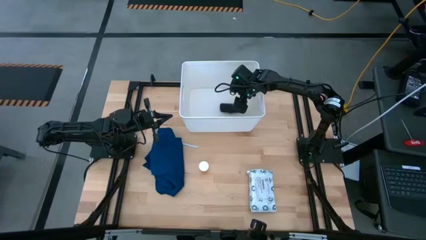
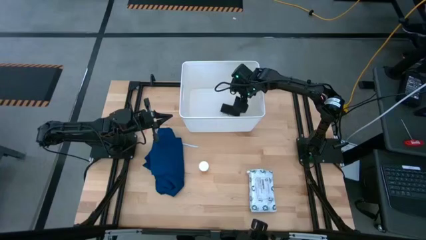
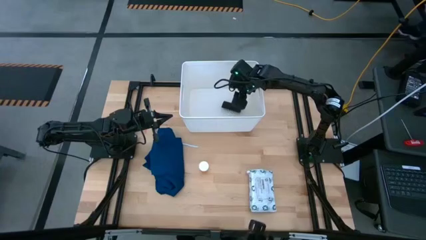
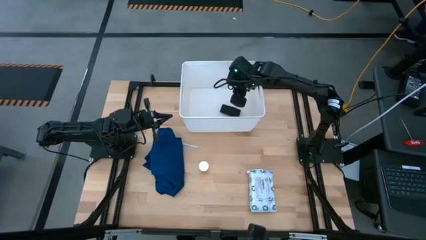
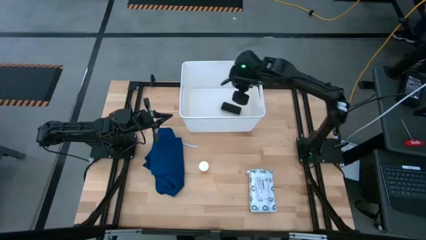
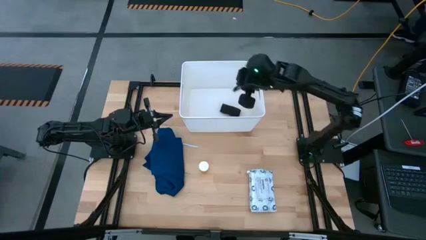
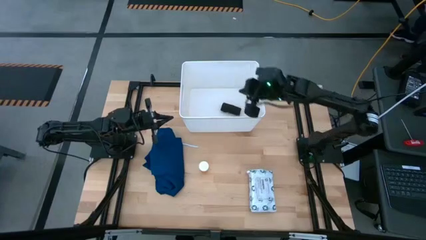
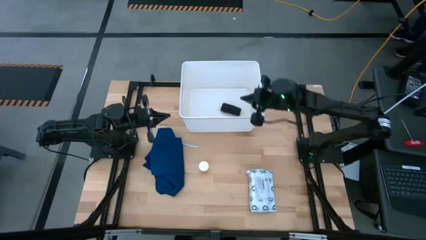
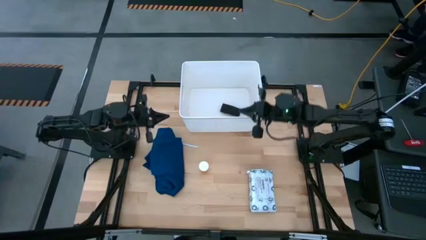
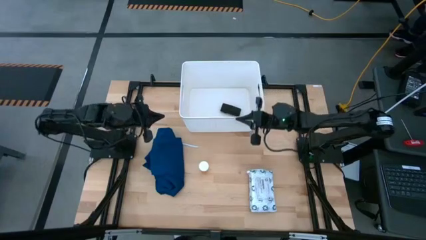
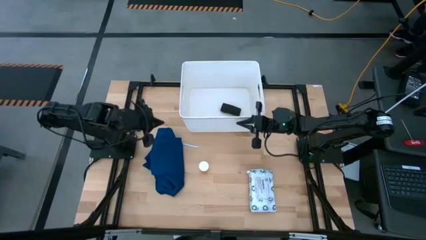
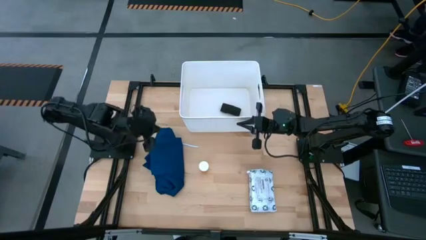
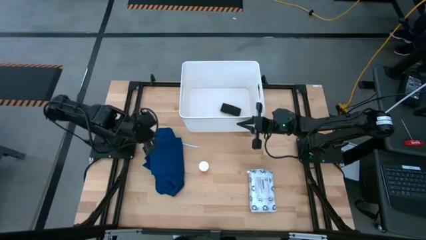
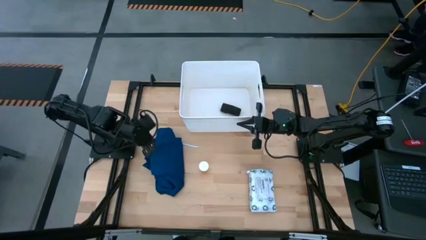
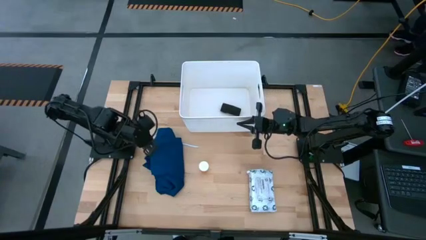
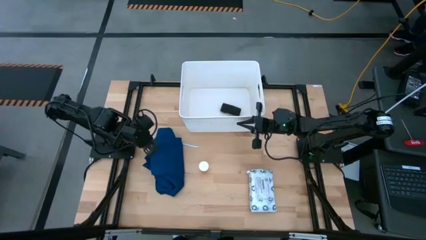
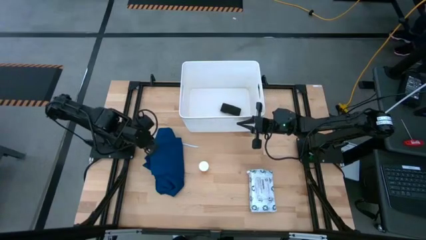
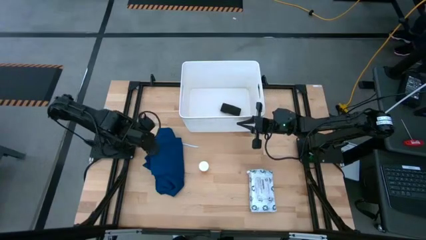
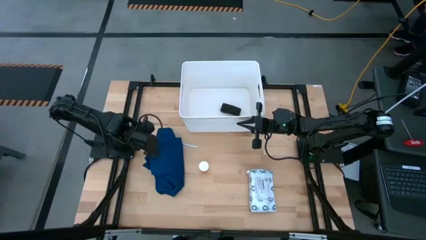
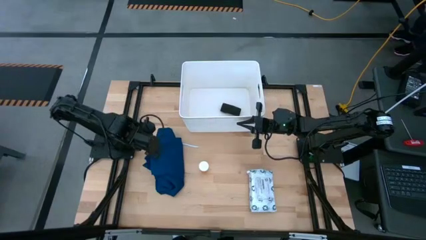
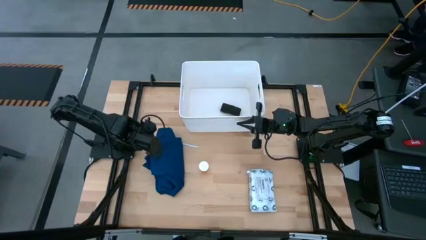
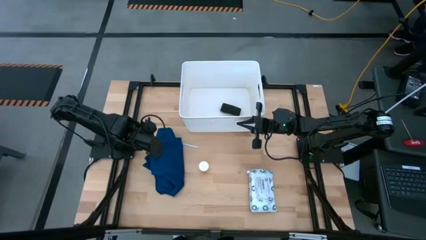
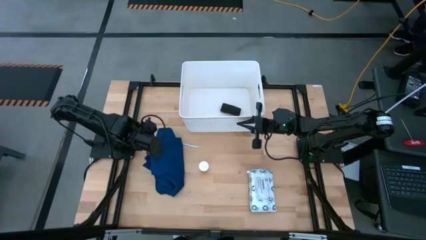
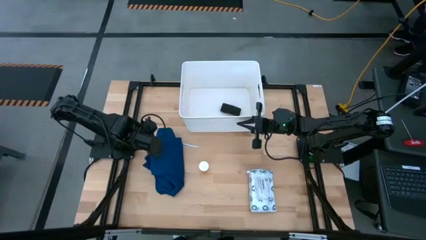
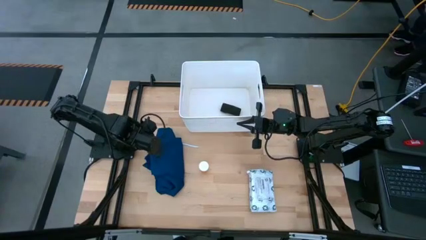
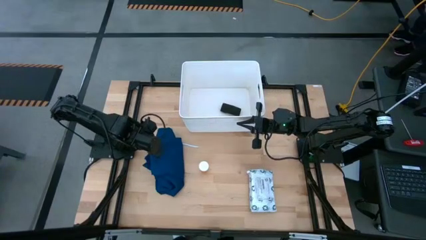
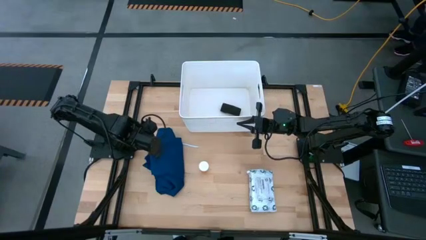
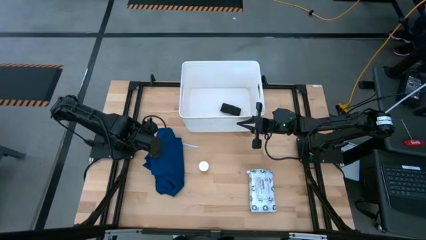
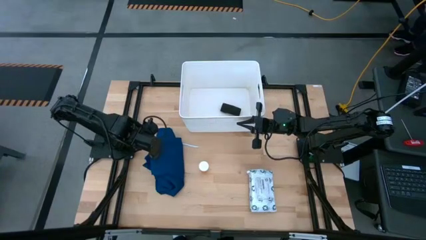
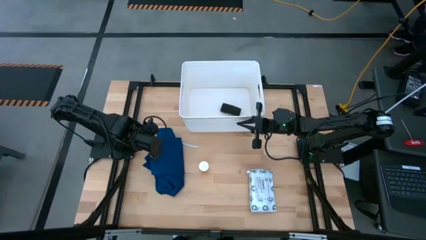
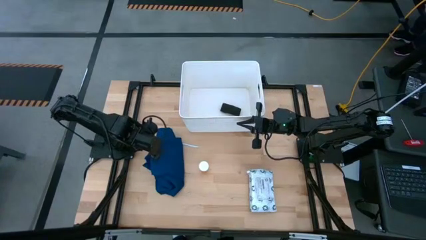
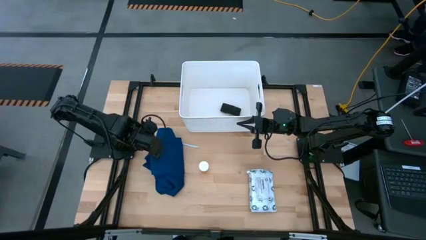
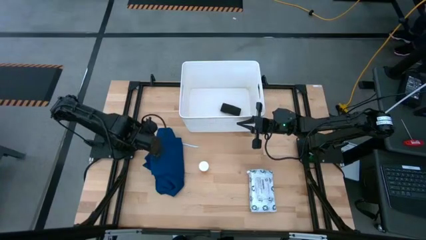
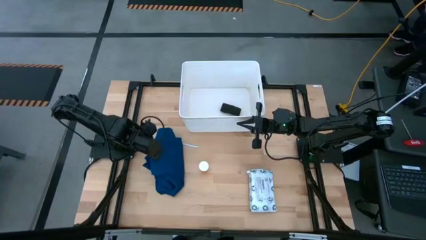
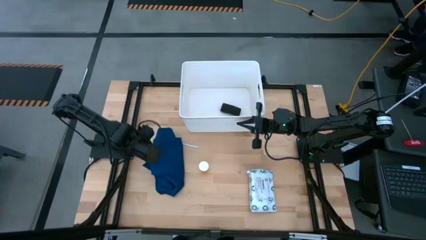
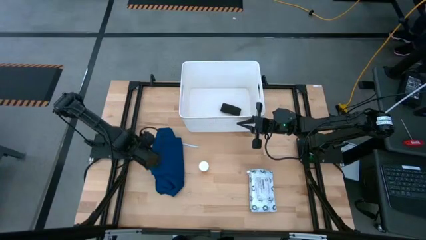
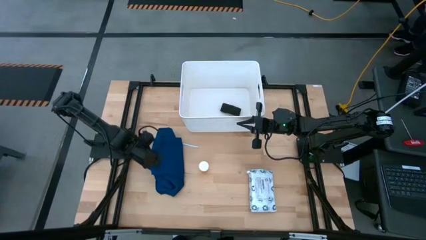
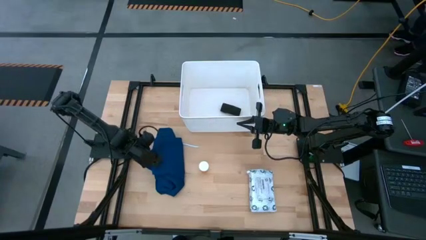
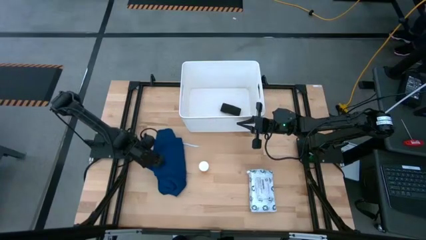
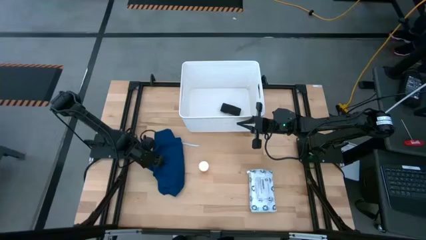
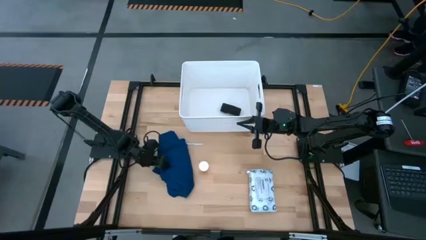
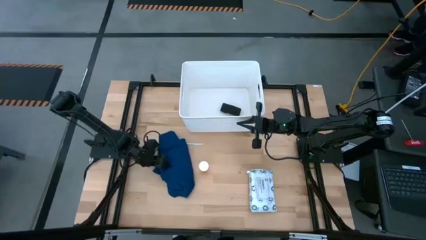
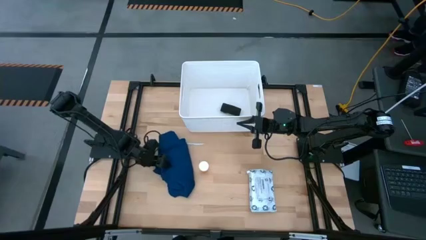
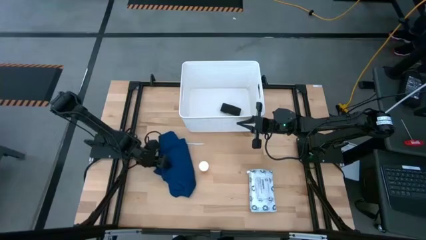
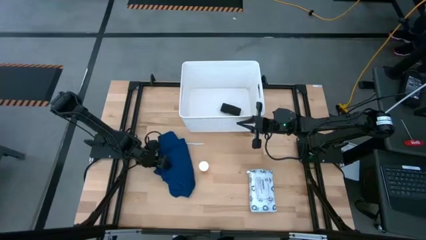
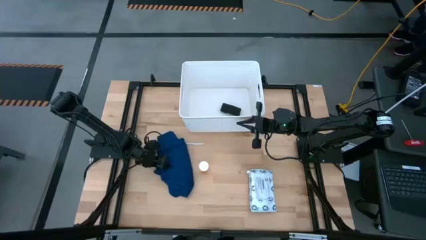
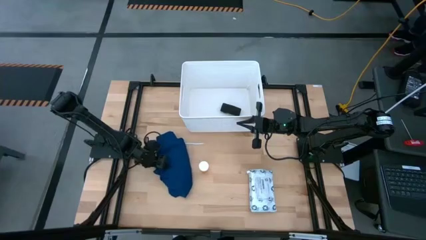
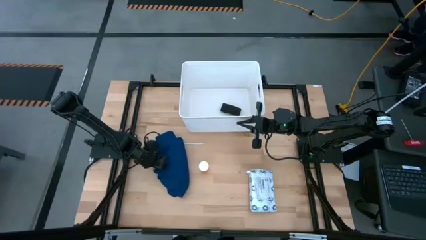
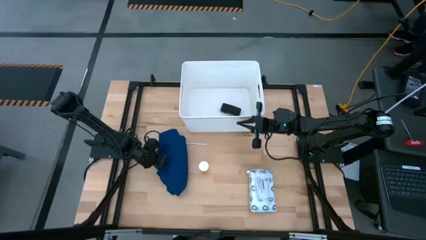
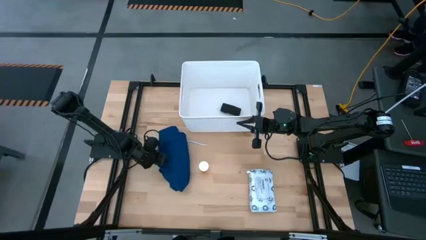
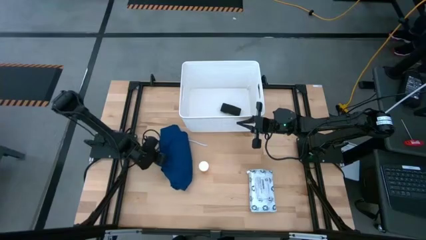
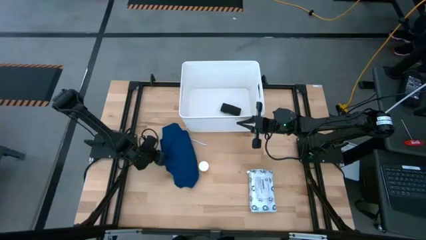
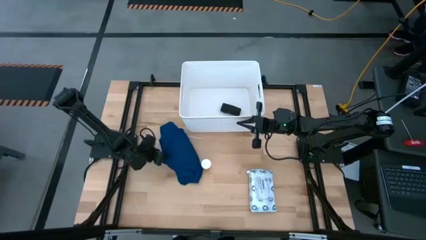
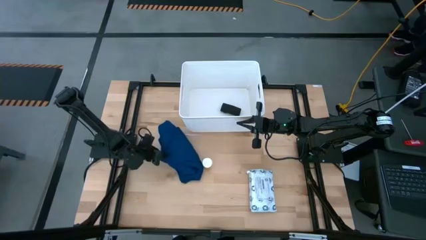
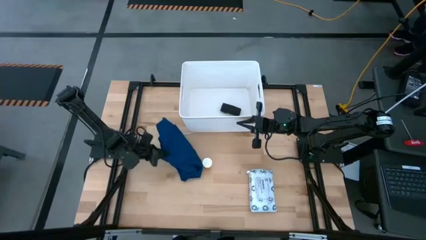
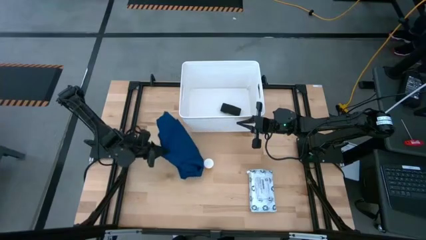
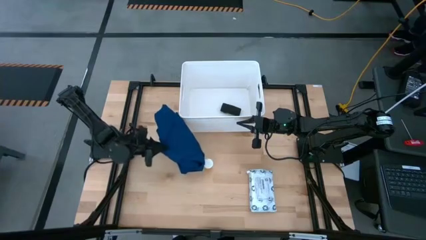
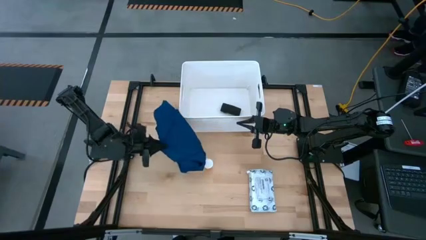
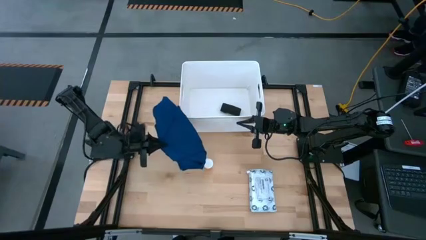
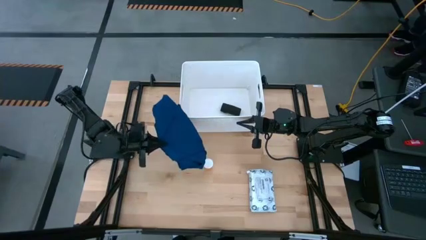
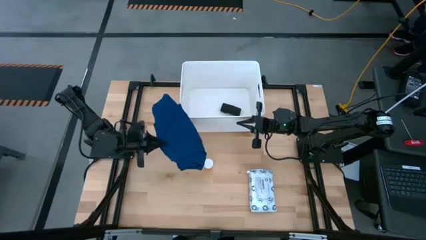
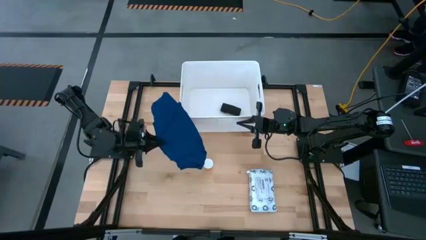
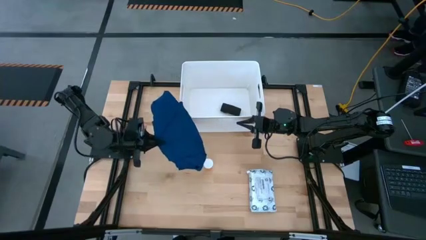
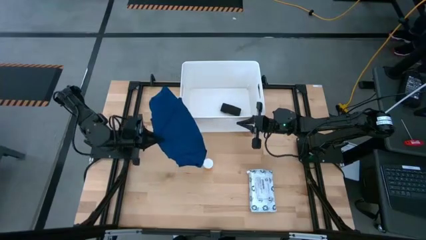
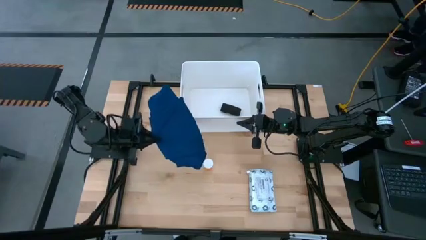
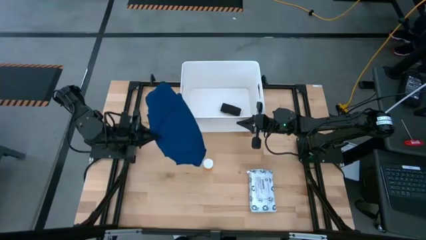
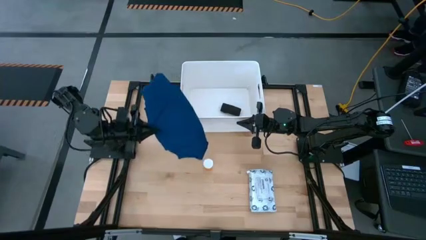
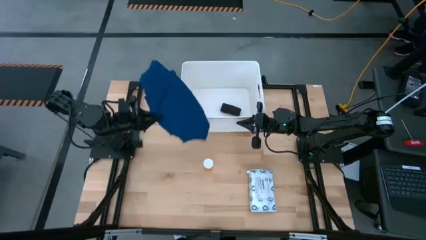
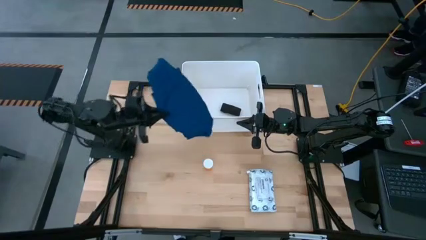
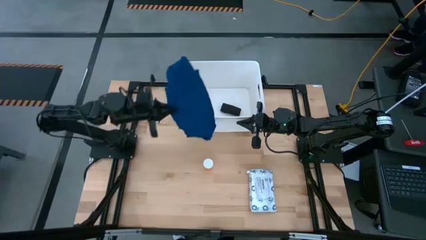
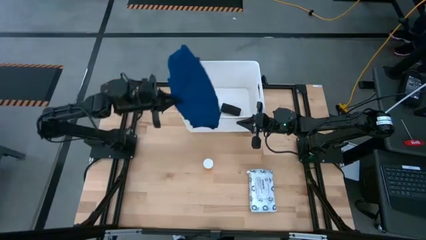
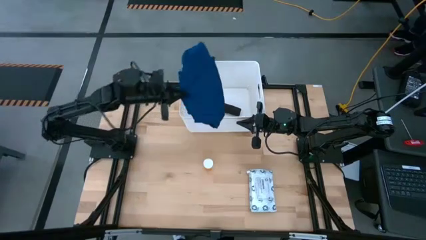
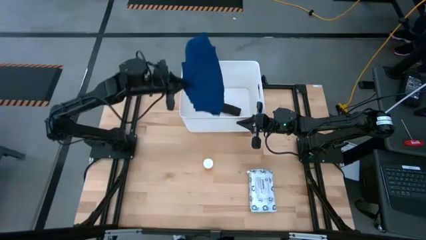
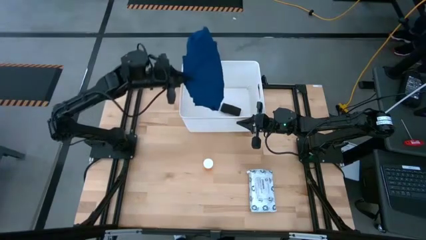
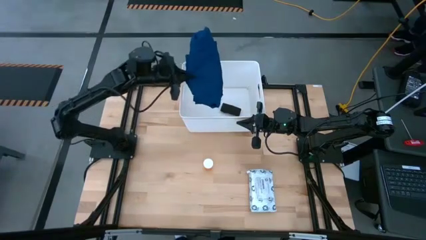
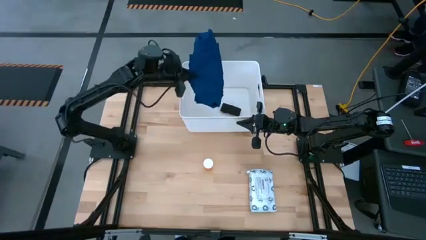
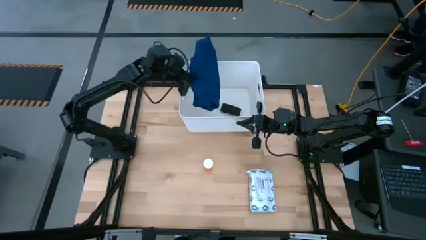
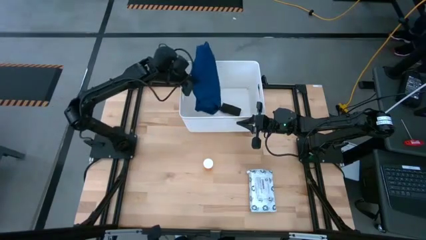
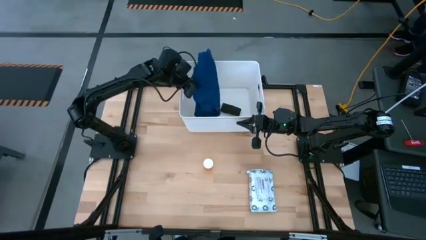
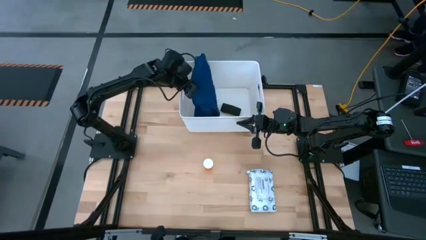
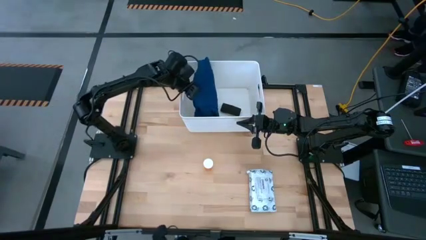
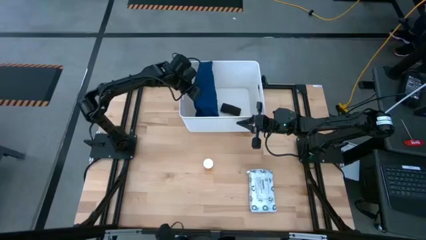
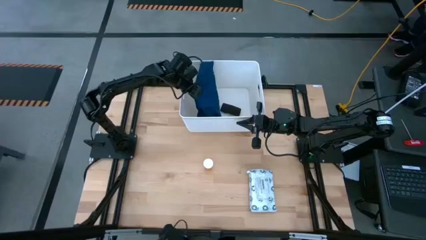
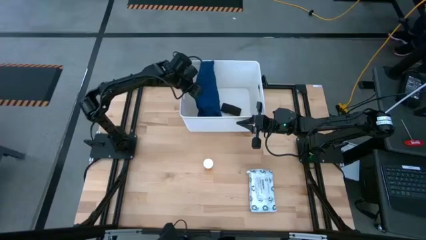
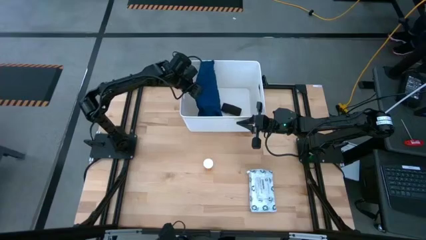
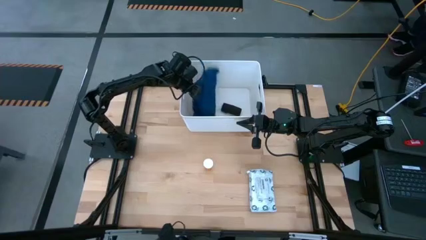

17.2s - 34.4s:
Task: Pick & place medical supplies in basket/bin
Put the blue gown into the white bin
